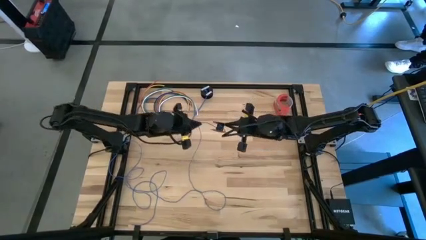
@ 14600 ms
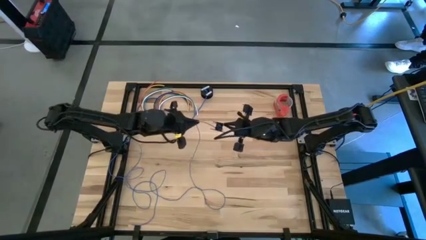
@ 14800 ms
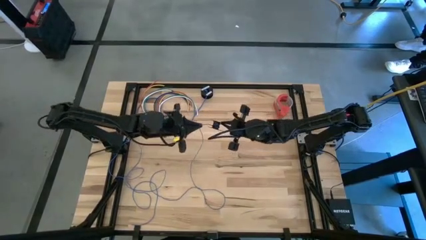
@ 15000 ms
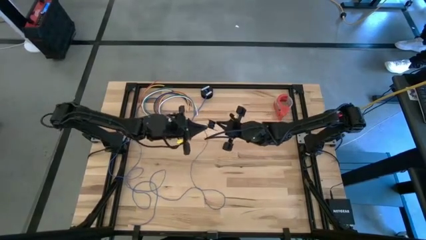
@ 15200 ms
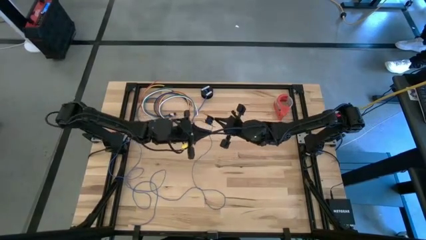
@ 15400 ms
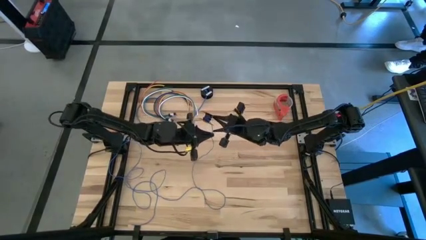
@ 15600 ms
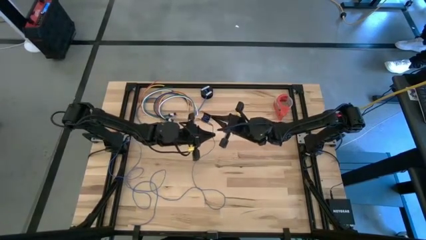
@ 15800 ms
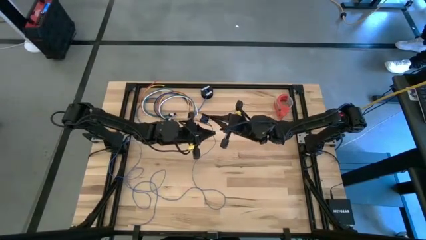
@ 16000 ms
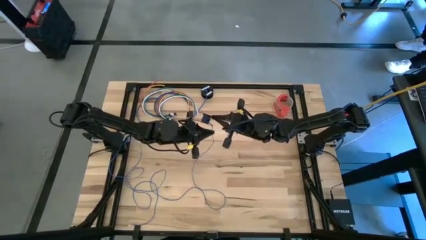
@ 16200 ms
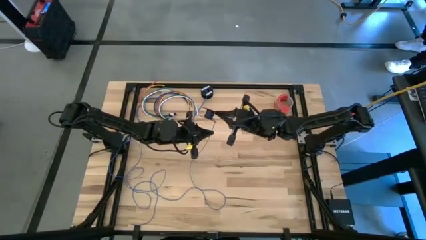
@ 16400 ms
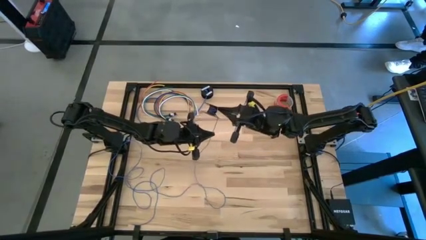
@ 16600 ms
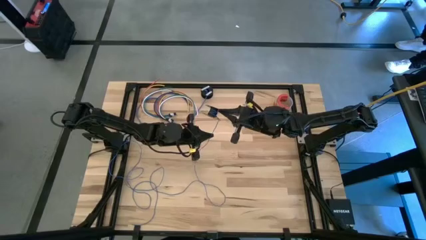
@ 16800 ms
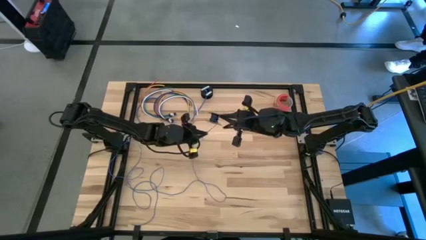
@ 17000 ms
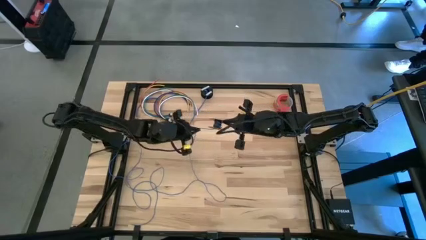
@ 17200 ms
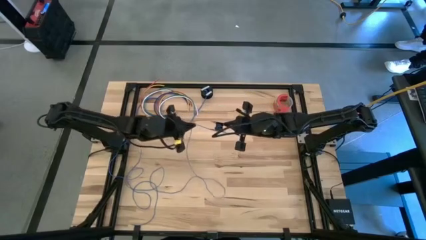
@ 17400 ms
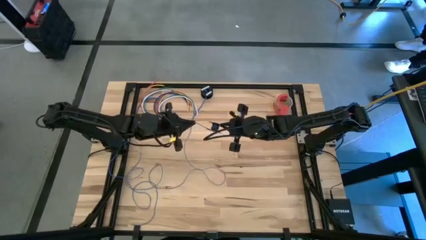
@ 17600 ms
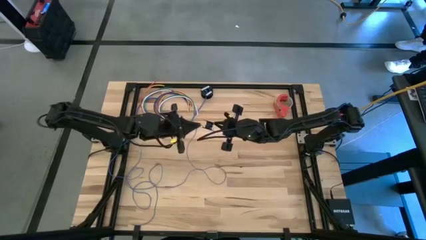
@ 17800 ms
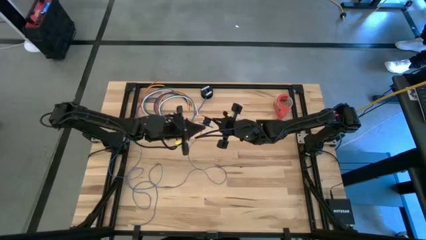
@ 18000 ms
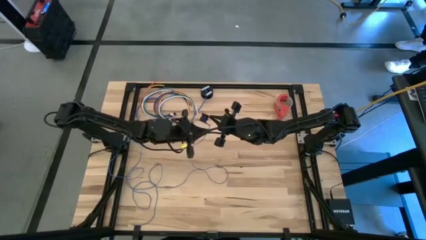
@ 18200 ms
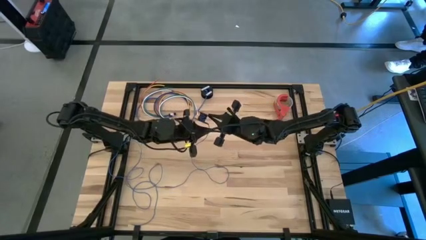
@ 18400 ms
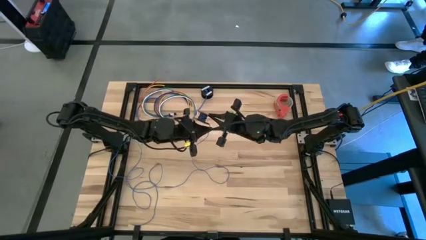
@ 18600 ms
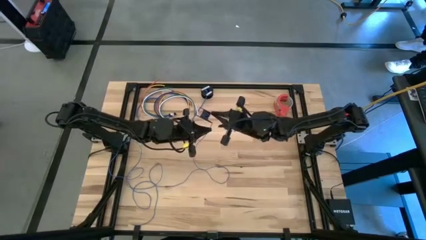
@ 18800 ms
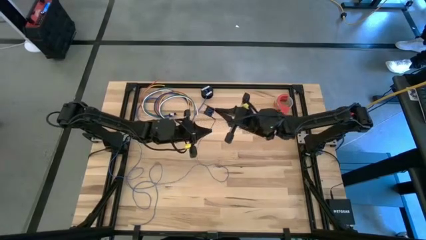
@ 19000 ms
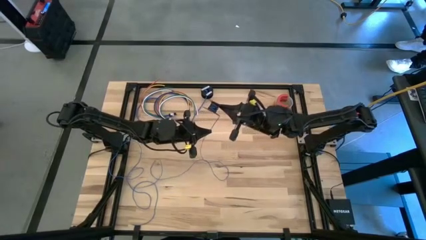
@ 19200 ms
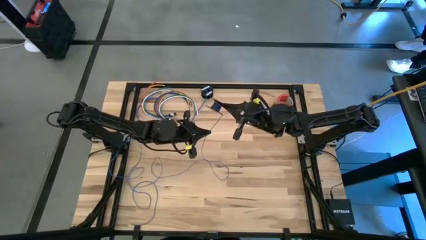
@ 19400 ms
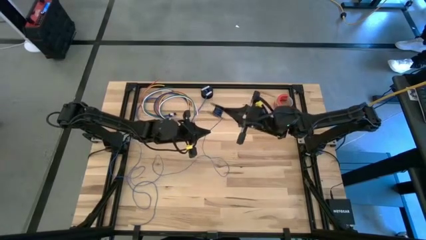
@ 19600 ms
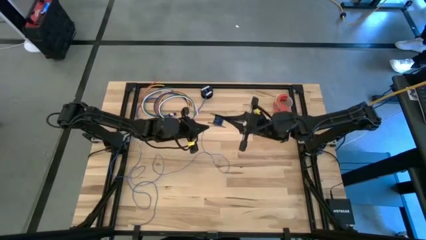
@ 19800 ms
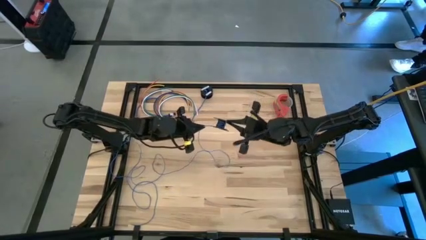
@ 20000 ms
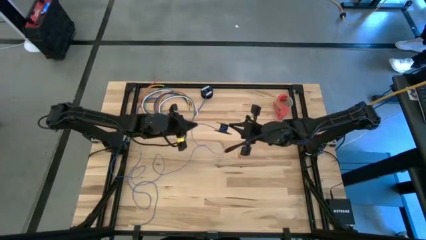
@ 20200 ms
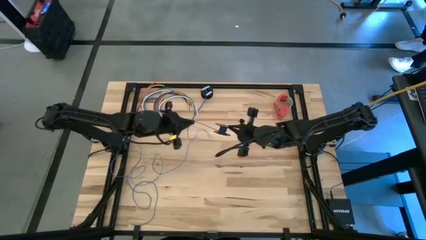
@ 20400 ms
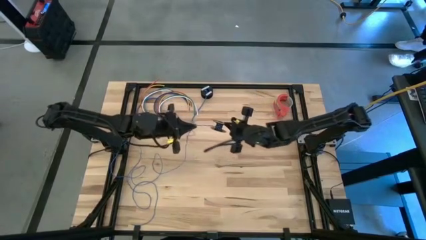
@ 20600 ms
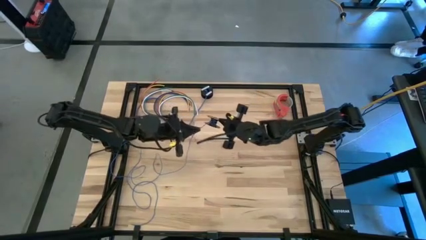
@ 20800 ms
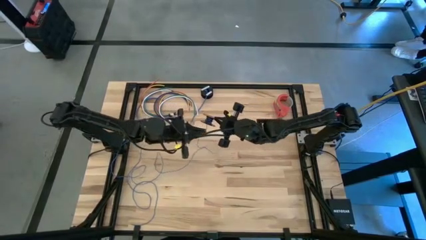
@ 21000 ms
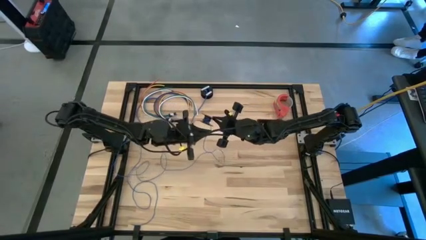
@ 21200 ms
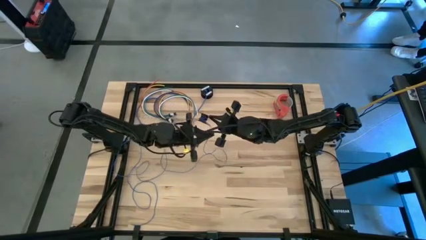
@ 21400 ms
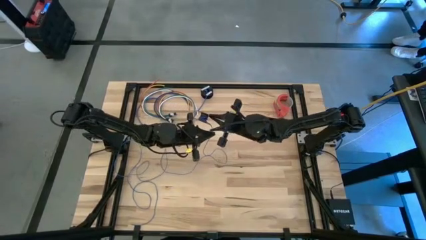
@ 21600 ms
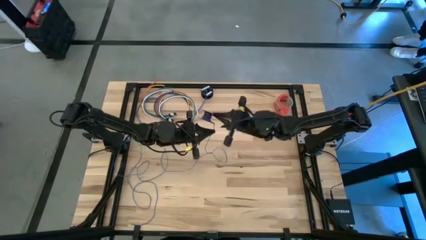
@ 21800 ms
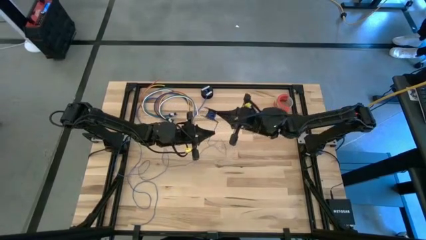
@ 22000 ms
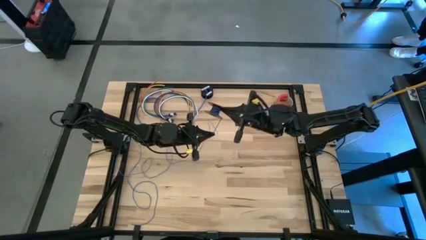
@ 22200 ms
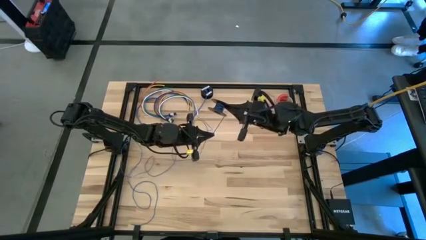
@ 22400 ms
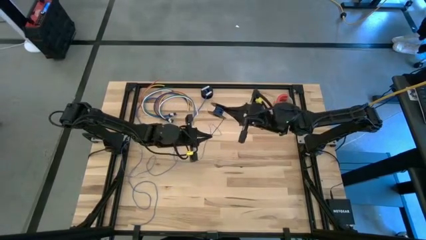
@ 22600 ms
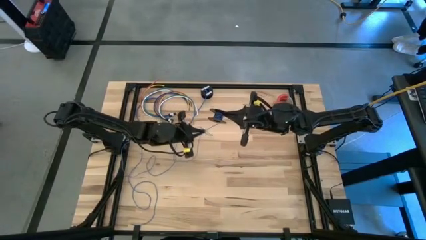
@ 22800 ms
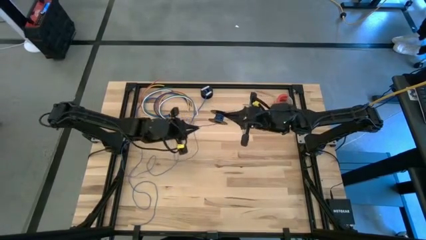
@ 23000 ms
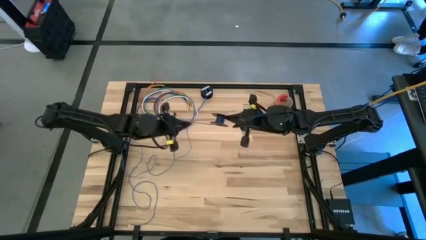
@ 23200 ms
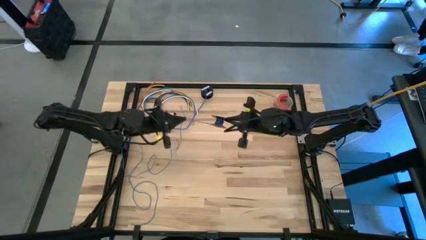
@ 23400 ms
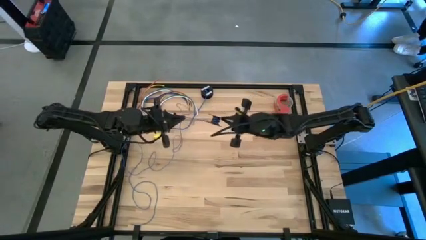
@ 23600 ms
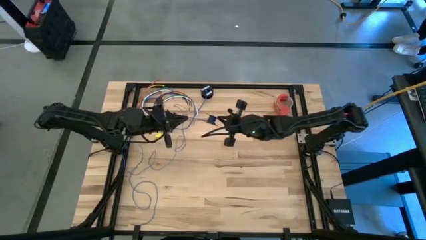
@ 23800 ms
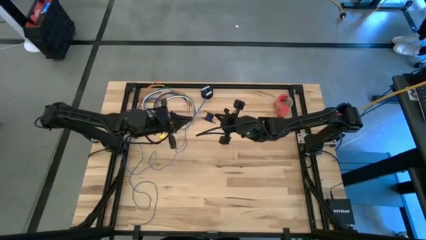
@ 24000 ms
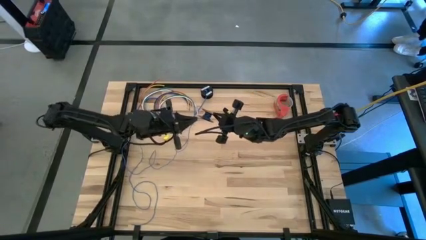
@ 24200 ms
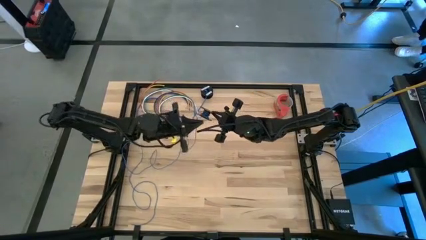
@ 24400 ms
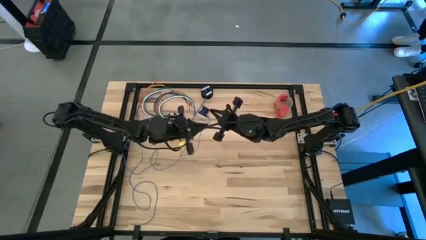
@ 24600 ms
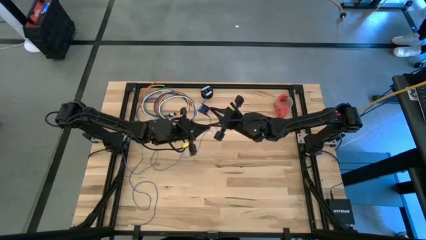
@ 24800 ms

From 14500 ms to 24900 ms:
Task: Coil cords
Coil the blue wire onto the spool

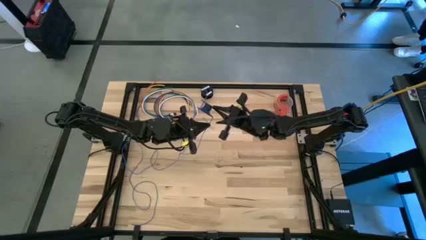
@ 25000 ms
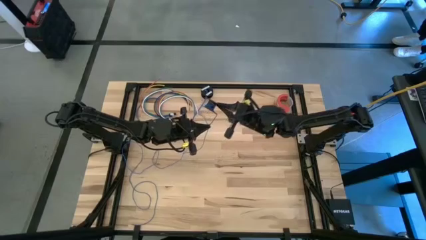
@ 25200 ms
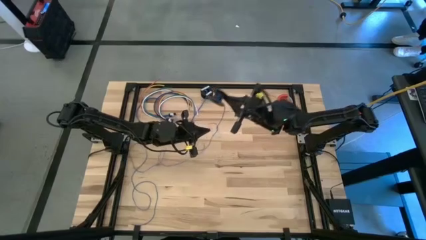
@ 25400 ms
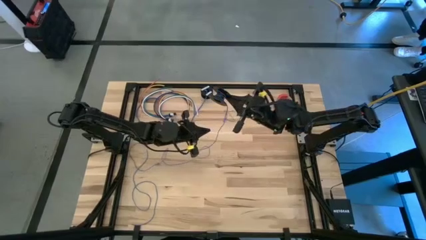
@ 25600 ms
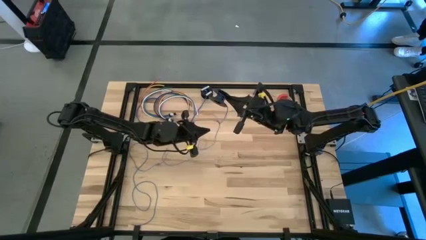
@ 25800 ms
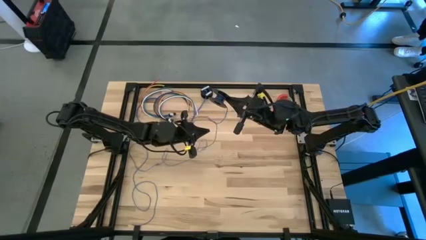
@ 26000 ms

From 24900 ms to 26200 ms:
Coil the blue wire onto the spool

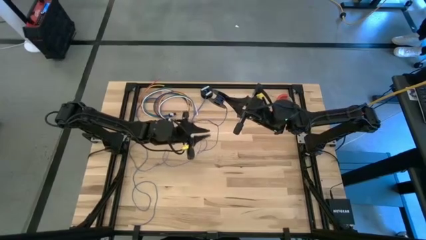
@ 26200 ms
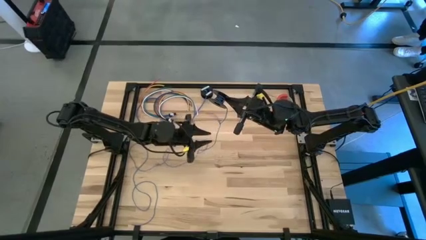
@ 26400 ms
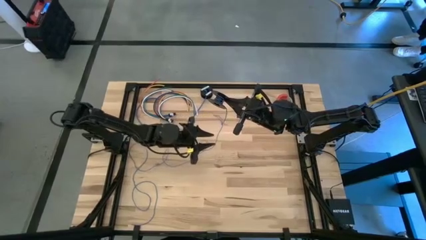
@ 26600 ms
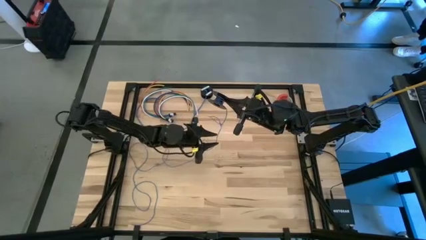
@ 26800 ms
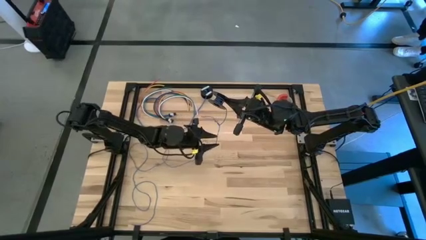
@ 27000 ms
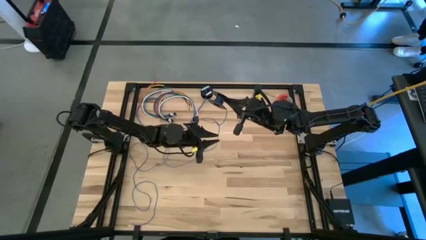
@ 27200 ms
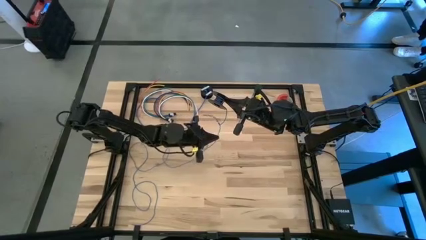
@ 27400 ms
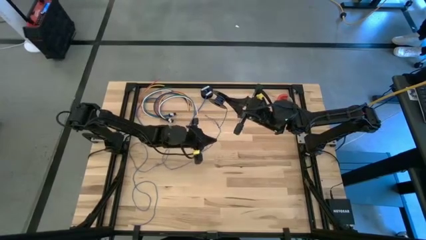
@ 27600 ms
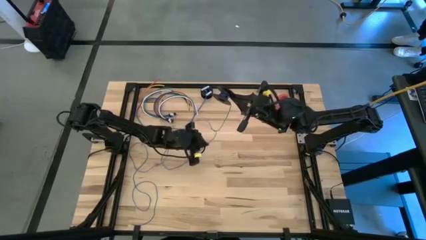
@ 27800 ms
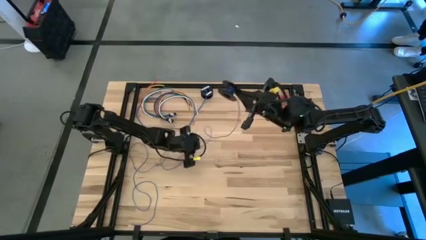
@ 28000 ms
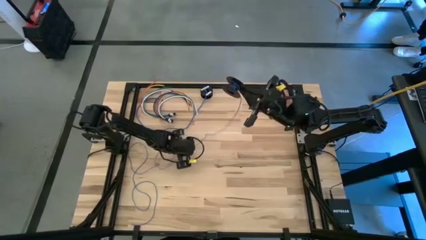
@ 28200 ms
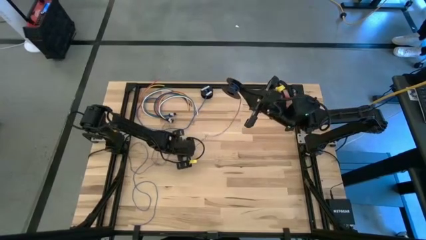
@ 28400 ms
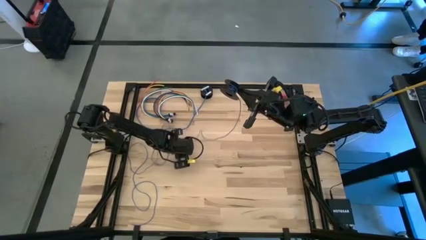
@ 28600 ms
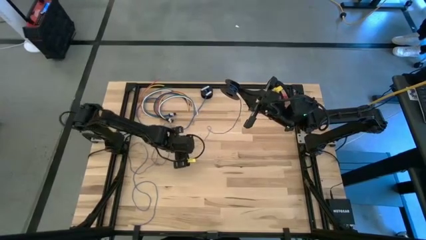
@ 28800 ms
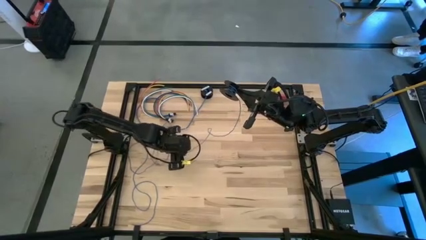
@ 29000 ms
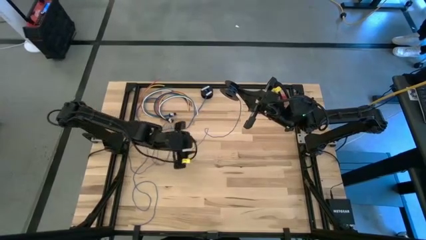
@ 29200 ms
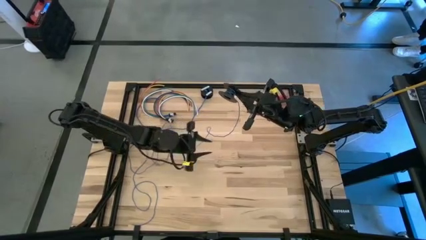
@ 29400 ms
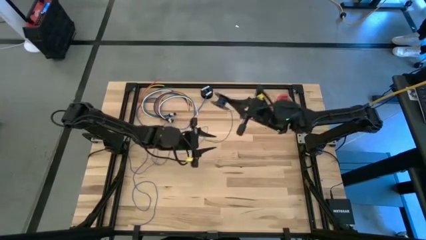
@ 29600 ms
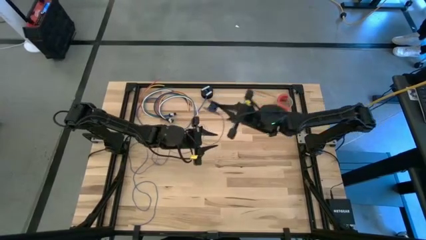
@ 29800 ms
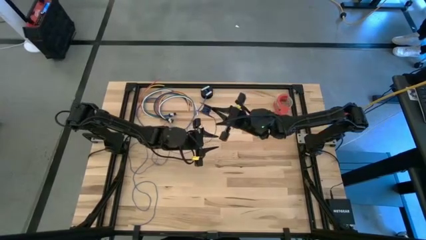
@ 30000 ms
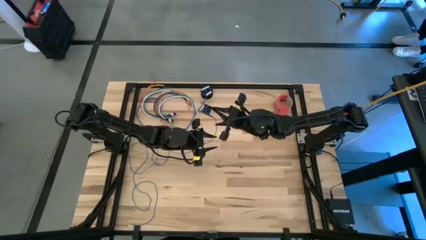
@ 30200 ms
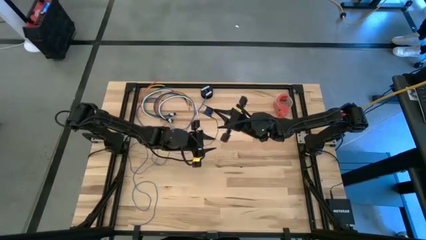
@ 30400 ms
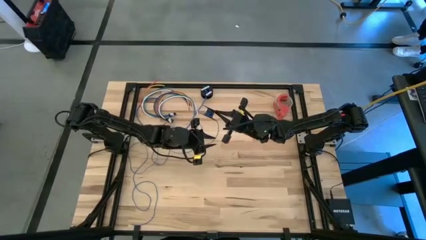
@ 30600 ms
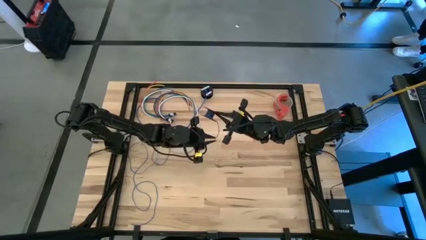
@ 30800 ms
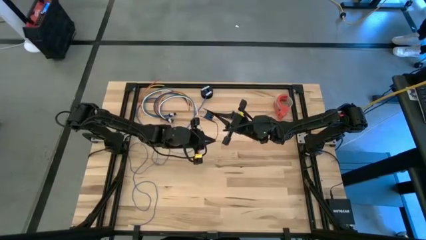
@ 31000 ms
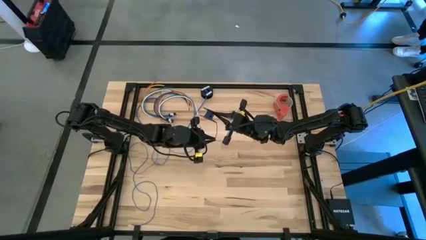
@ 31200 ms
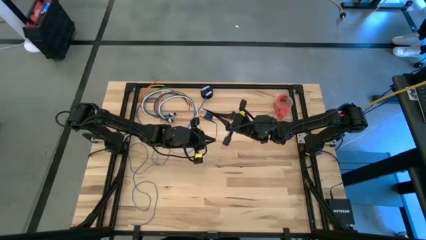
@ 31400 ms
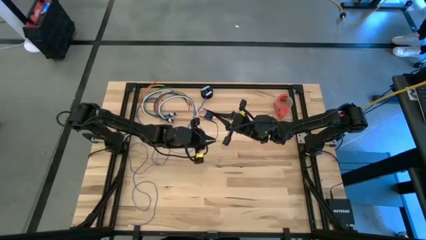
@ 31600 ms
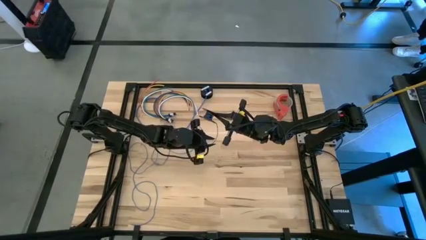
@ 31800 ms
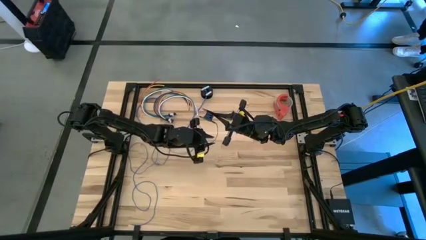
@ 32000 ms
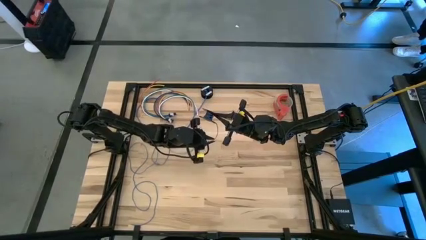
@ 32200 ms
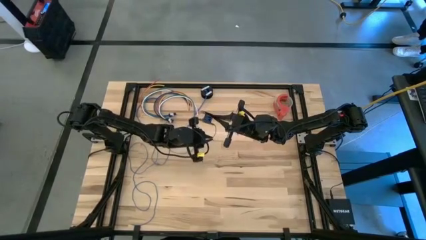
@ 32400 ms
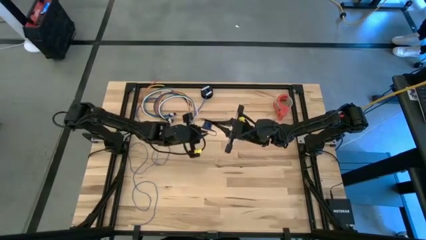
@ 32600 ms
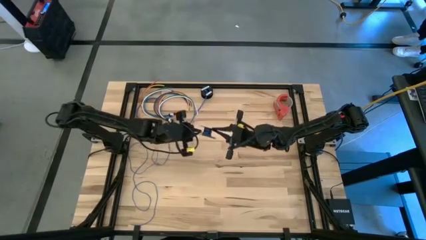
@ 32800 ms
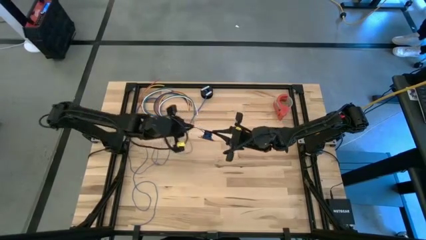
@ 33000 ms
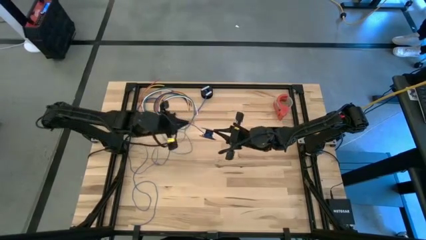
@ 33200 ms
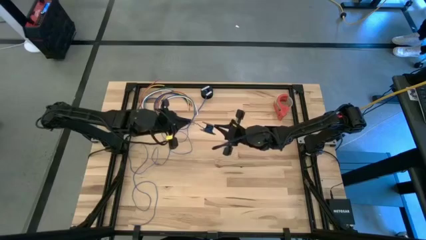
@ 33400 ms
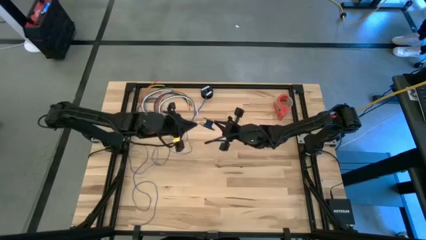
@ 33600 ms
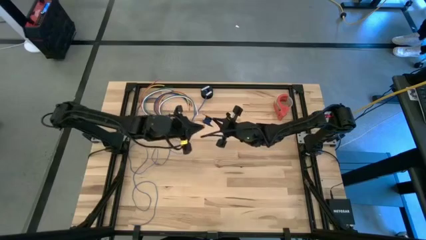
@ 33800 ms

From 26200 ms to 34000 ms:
Coil the blue wire onto the spool
